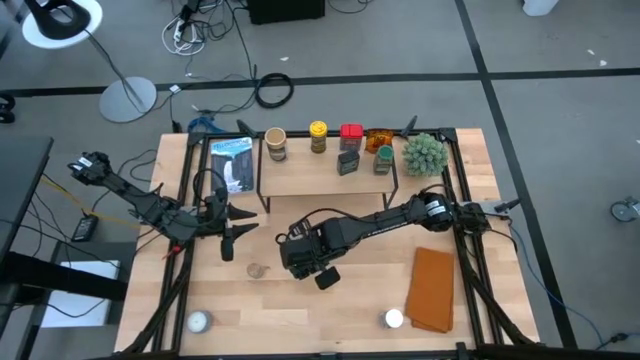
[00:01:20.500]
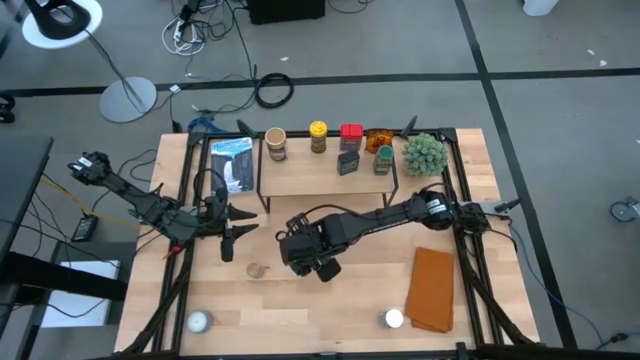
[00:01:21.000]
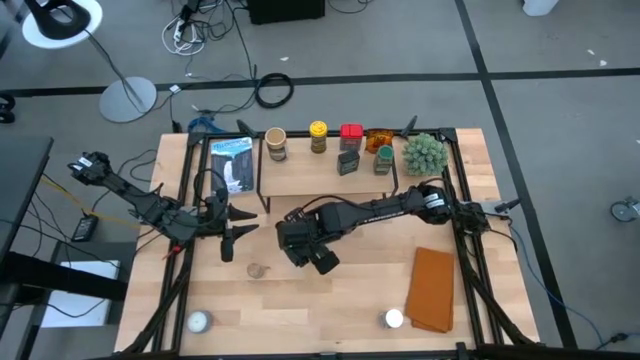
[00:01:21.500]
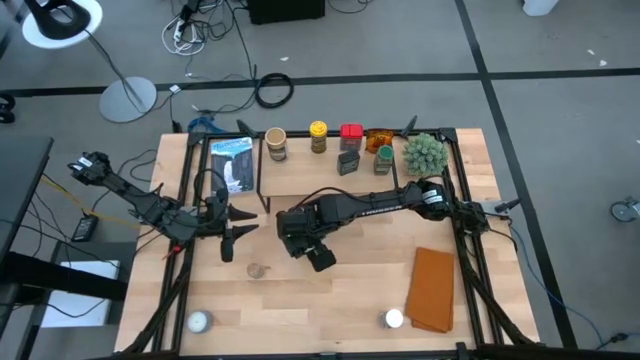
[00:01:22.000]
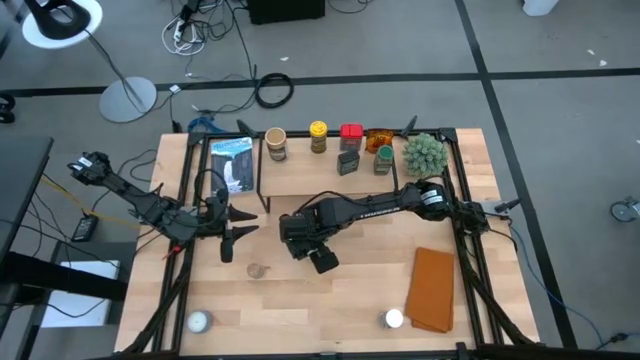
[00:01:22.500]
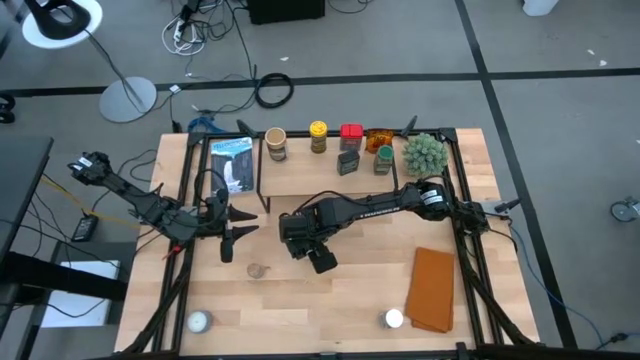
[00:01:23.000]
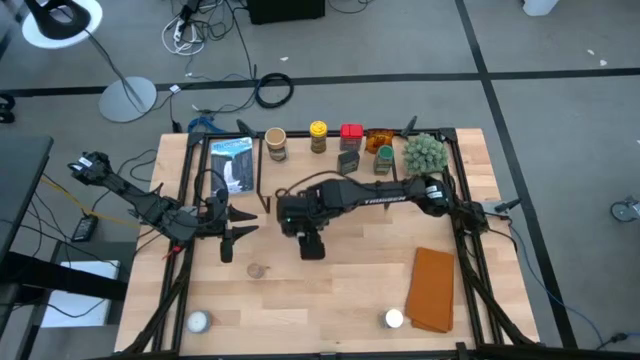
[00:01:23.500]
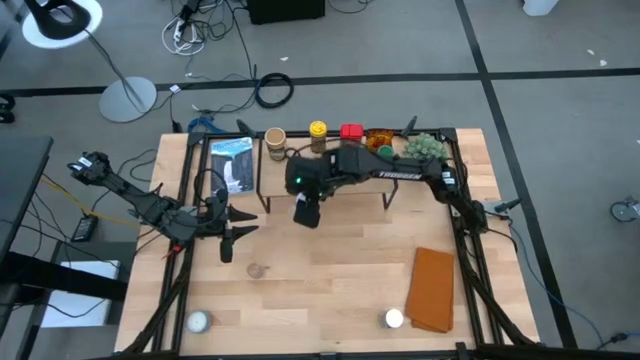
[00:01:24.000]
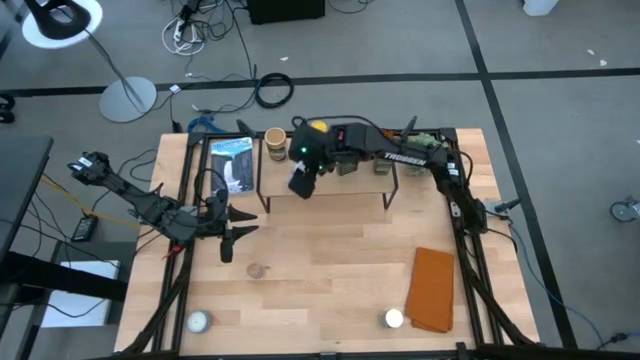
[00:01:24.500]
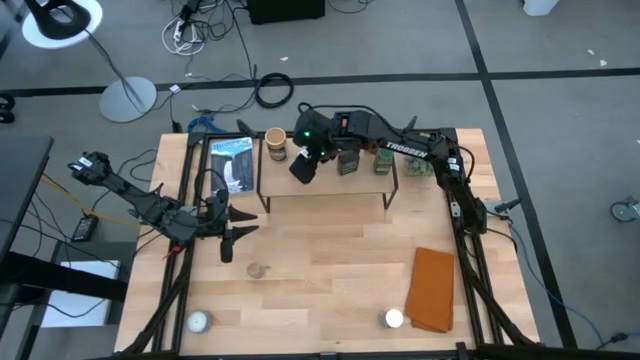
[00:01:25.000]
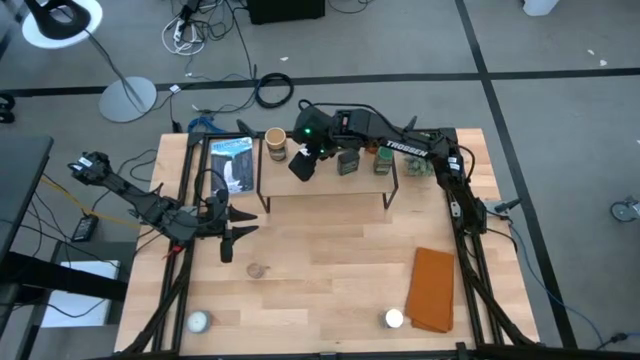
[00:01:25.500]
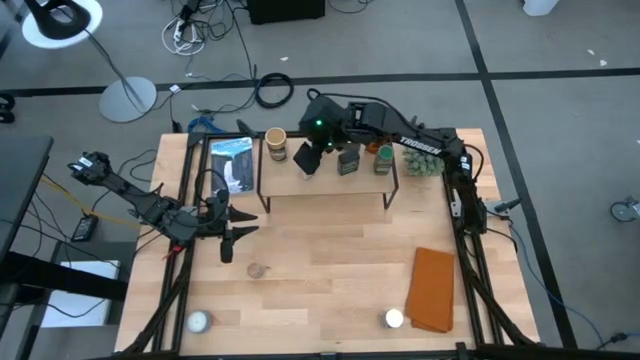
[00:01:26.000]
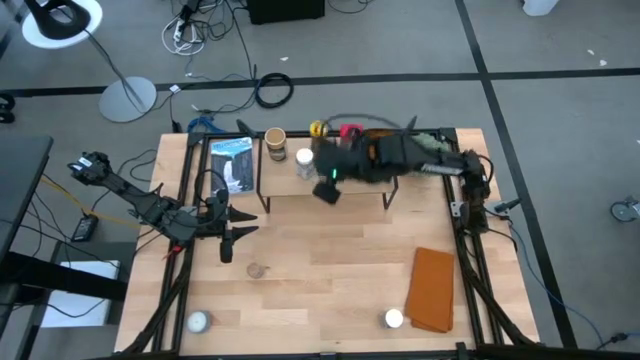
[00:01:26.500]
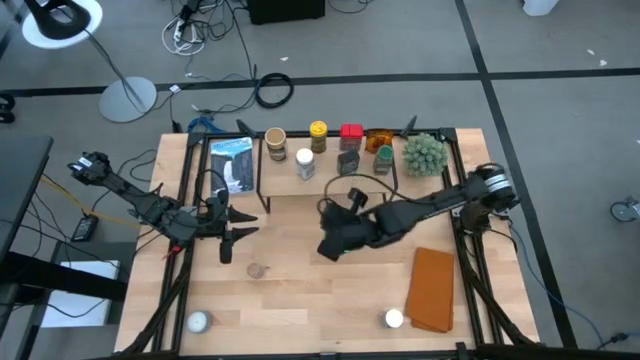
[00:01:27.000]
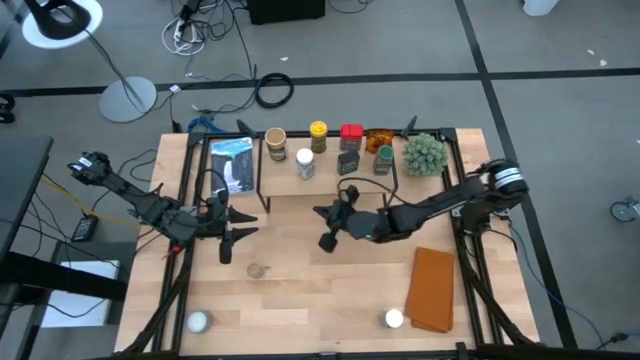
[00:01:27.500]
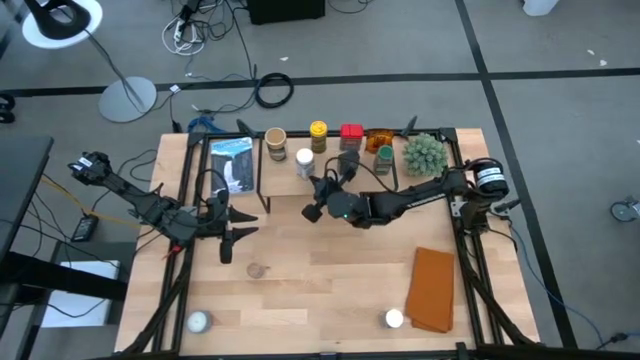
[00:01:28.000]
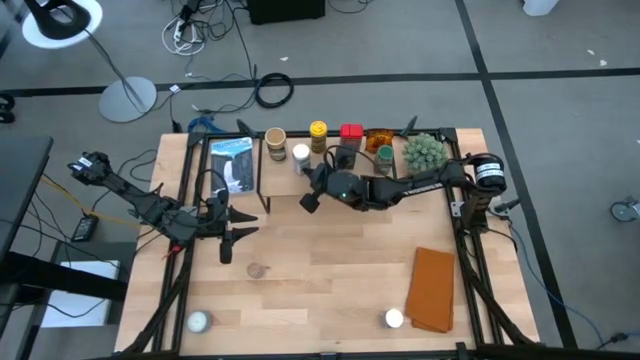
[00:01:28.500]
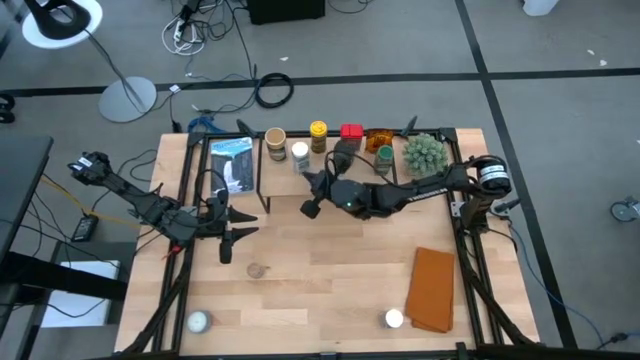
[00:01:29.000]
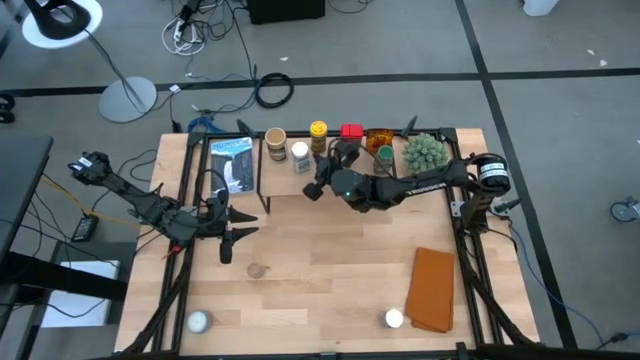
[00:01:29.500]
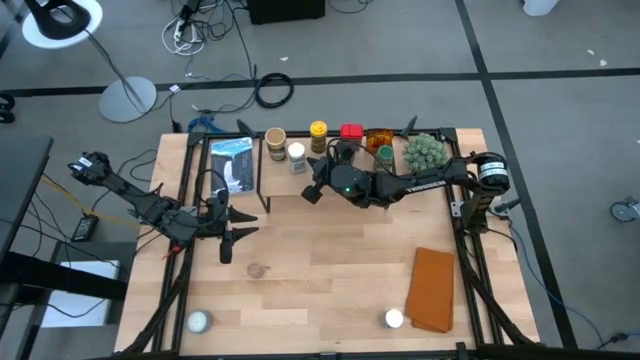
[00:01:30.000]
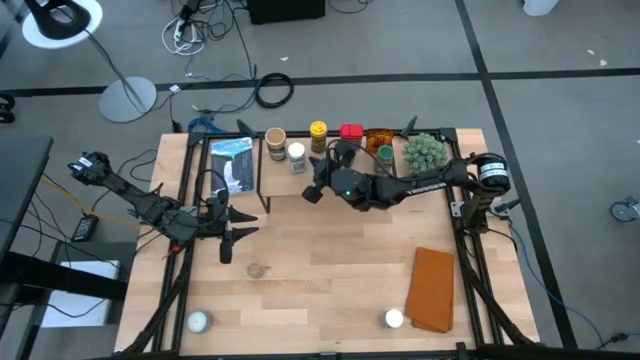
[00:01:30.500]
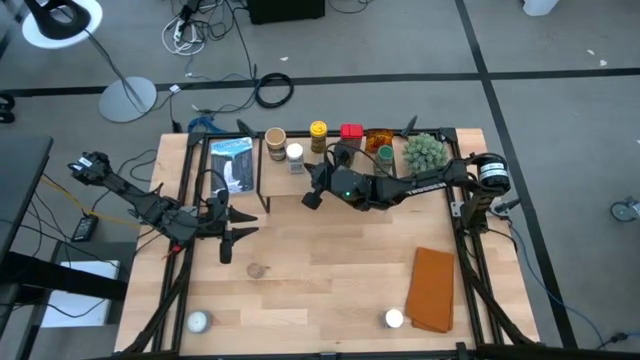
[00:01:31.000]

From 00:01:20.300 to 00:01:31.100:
Task: Shelf spices
Put the top white seasoning bottle on the shelf

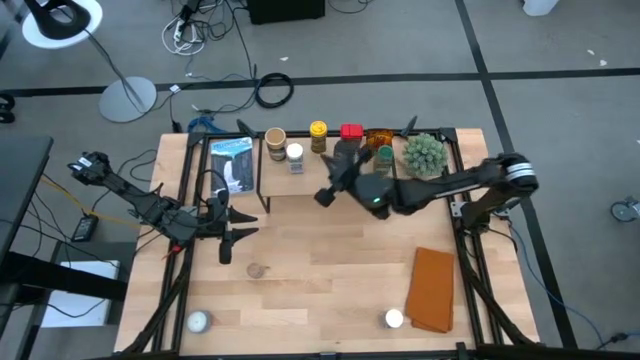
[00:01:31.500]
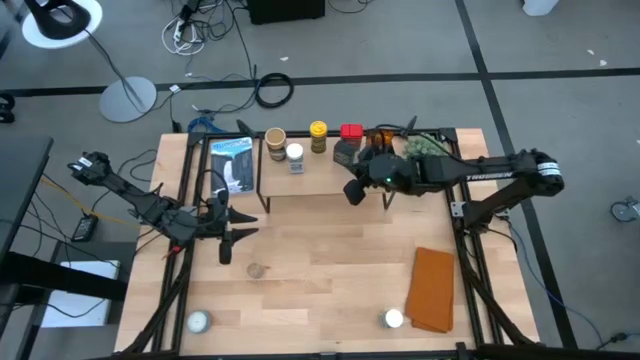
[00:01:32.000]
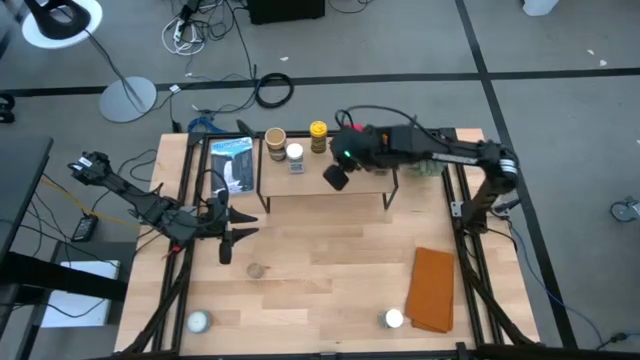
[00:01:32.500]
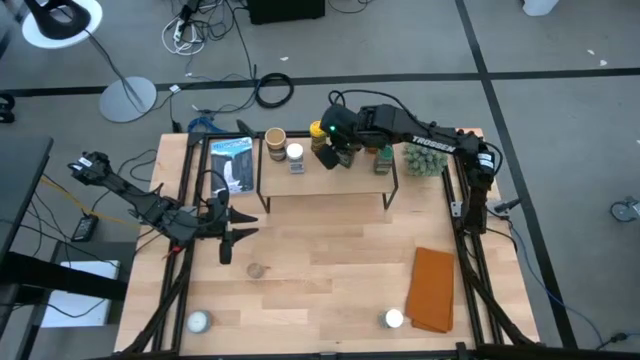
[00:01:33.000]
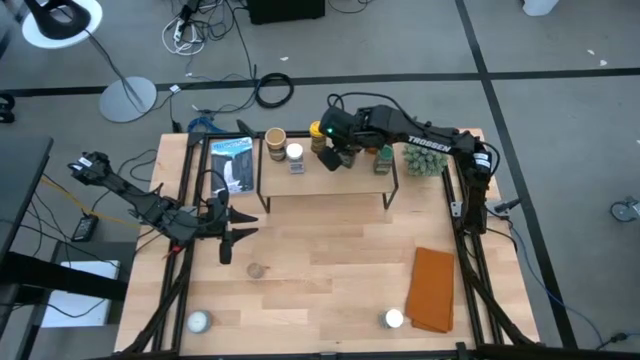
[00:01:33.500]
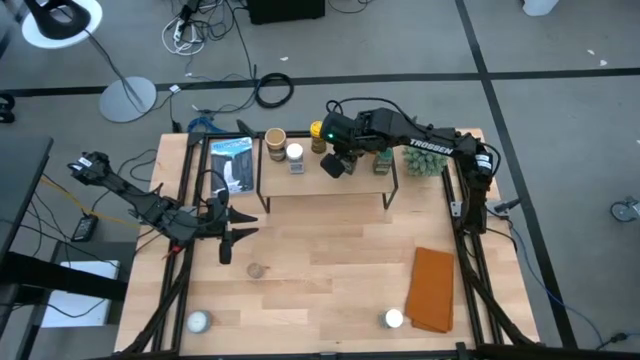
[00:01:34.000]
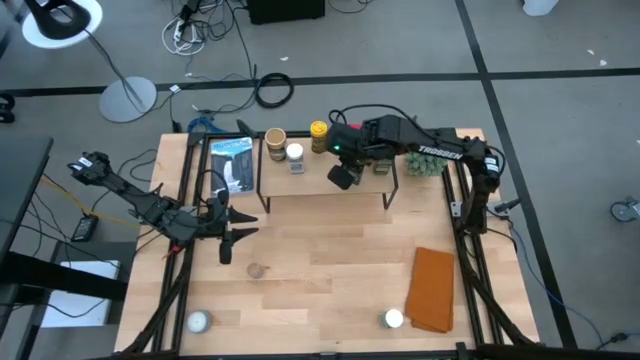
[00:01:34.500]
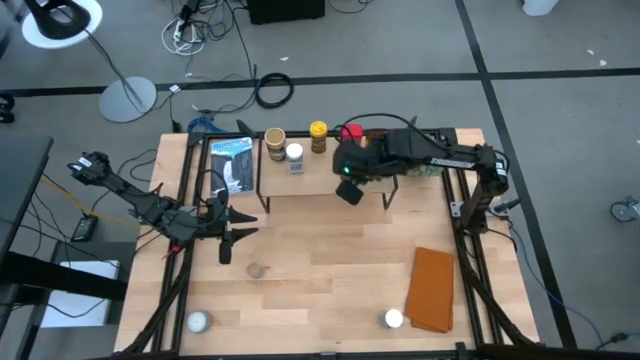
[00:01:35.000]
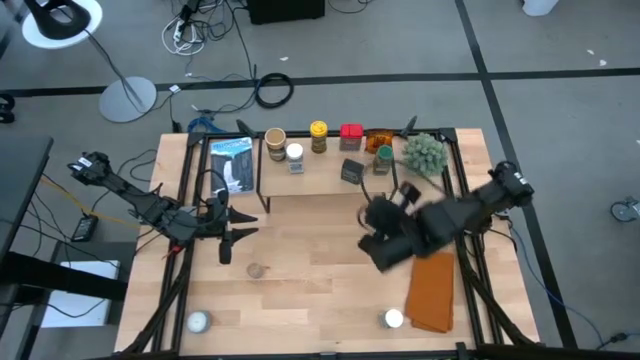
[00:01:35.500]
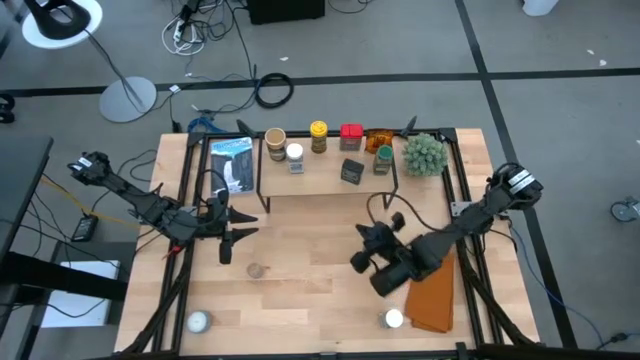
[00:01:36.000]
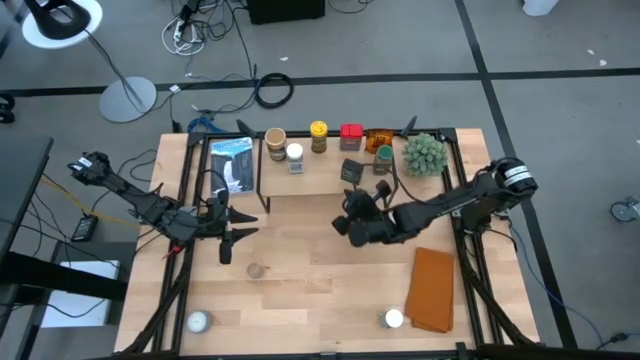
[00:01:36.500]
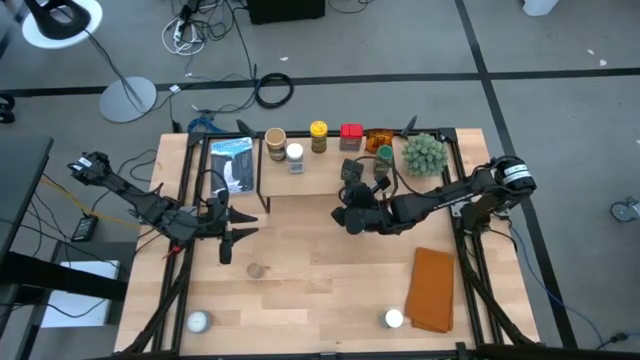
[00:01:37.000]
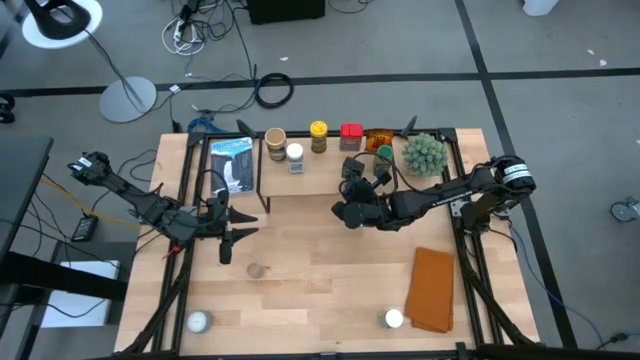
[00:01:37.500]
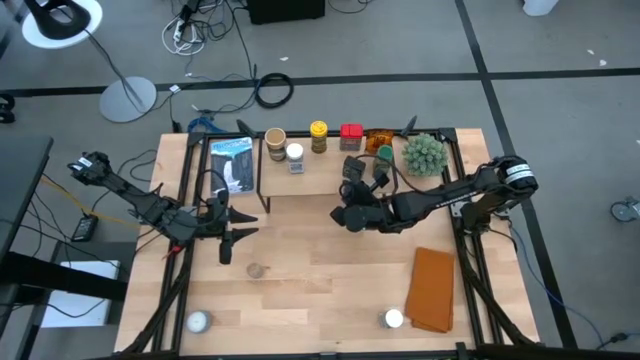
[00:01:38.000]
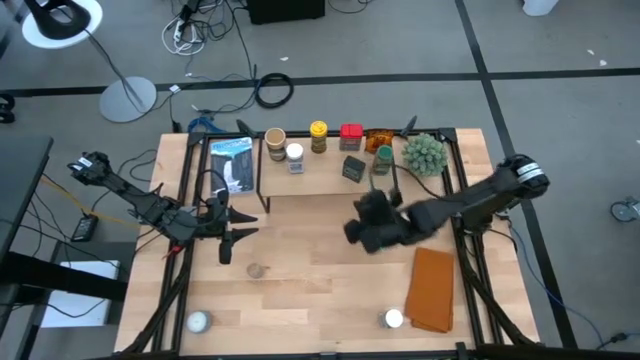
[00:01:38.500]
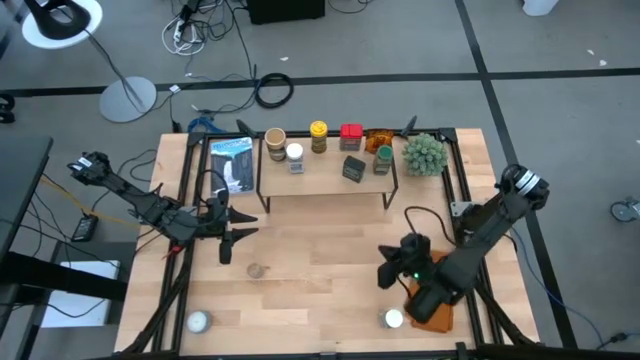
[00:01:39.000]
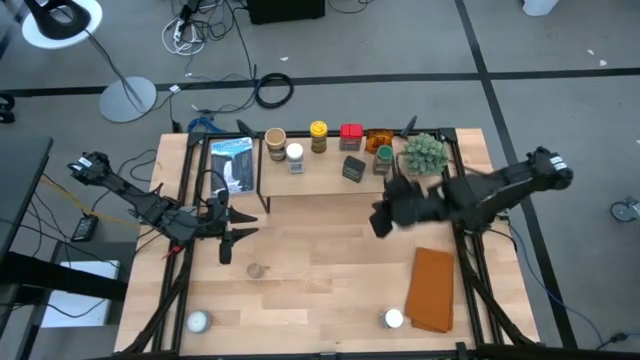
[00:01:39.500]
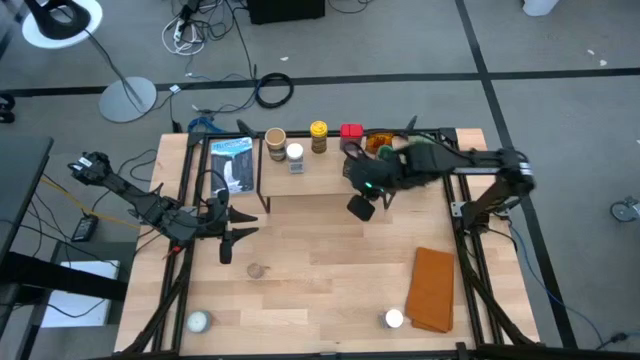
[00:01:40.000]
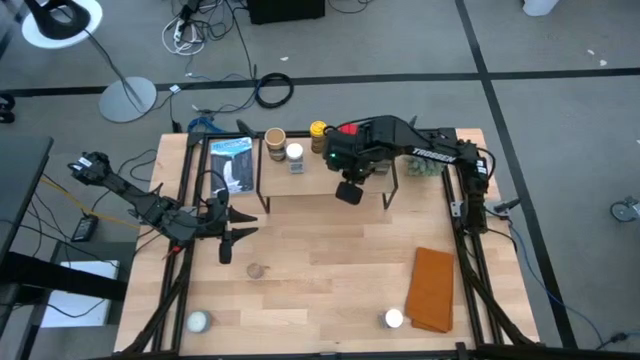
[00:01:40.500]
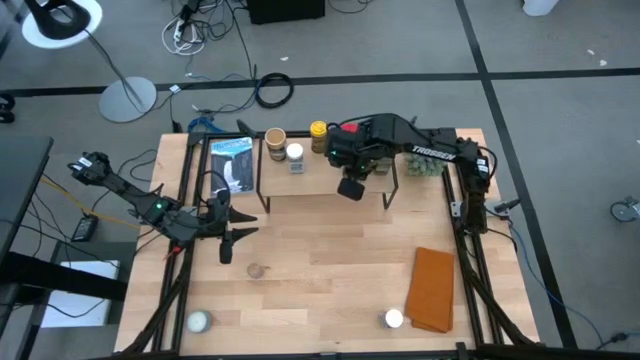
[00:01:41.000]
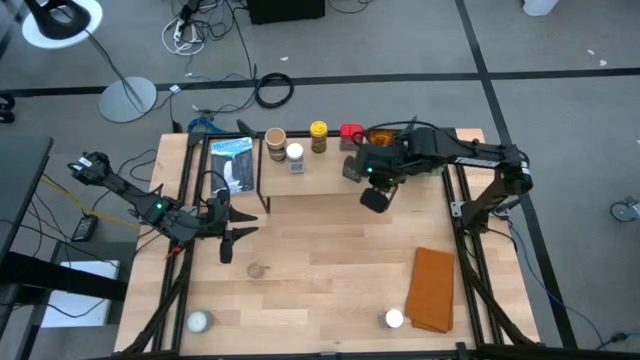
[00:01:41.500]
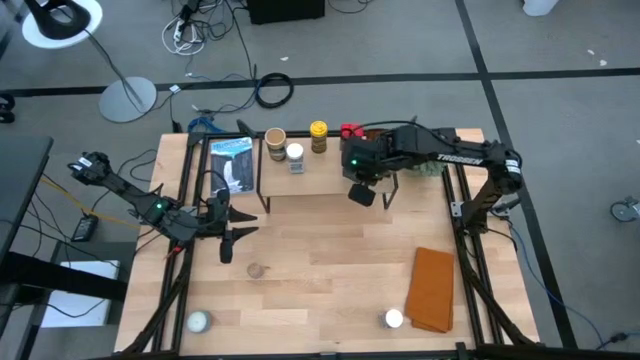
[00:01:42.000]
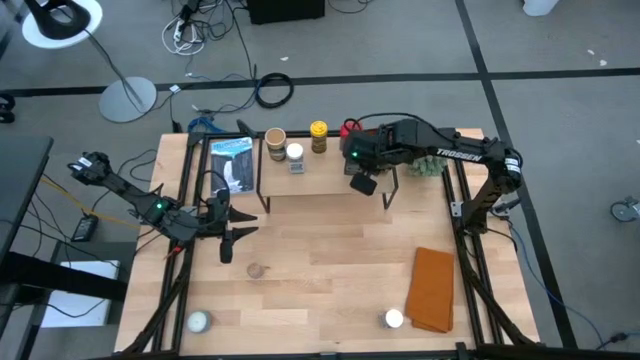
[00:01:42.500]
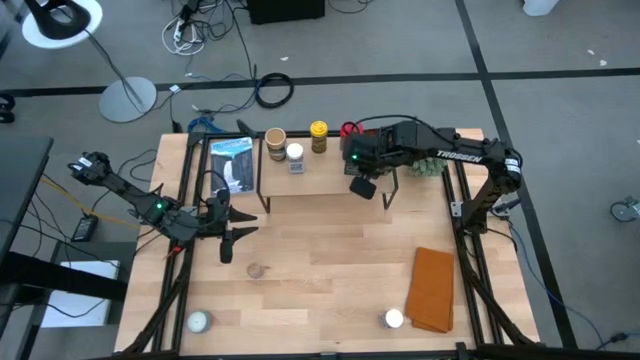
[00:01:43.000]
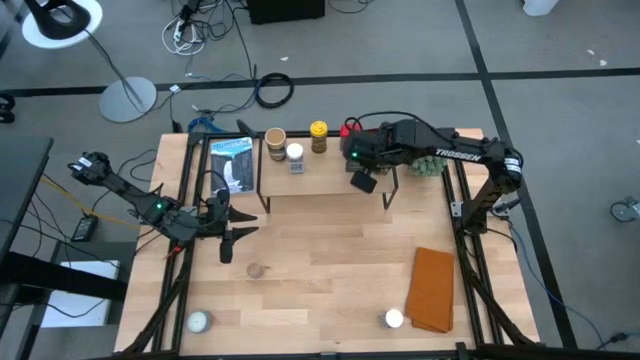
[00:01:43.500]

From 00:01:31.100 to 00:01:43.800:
Adjust the black seasoning can on the shelf
